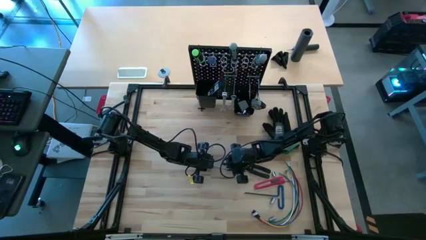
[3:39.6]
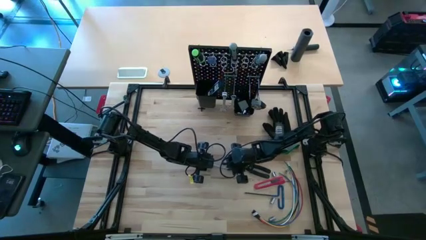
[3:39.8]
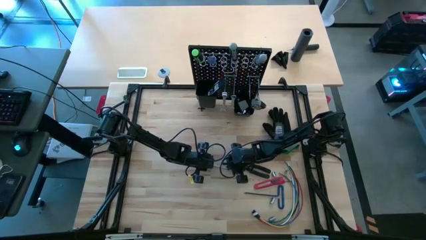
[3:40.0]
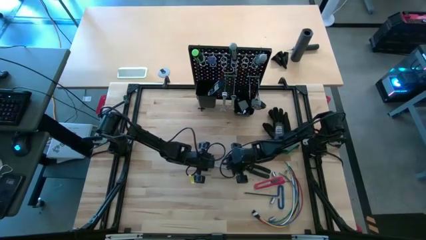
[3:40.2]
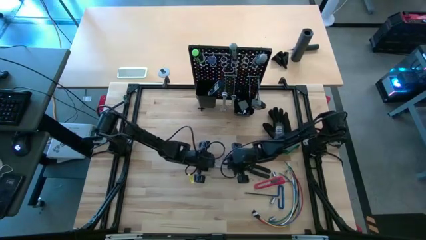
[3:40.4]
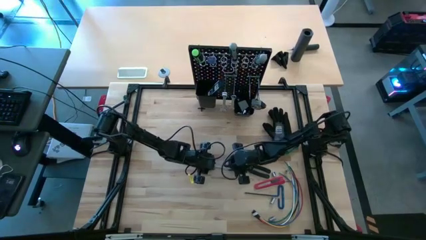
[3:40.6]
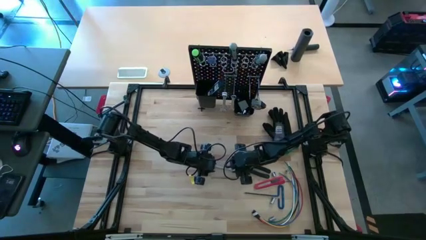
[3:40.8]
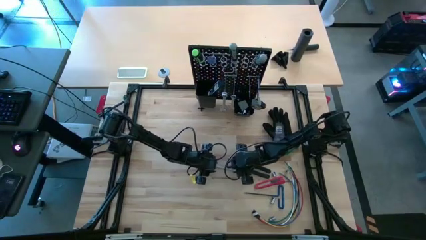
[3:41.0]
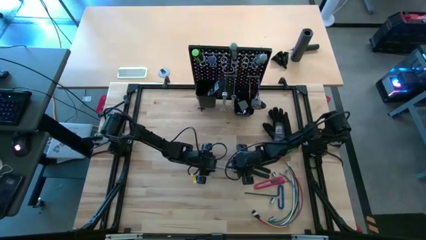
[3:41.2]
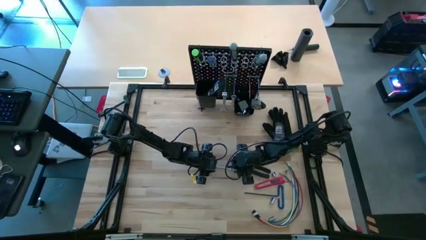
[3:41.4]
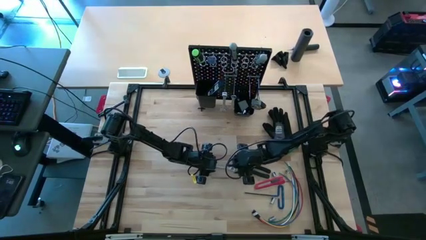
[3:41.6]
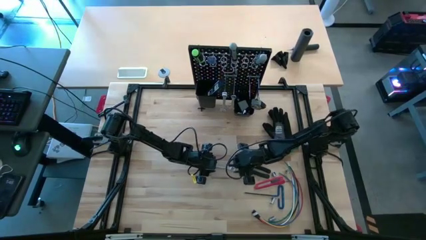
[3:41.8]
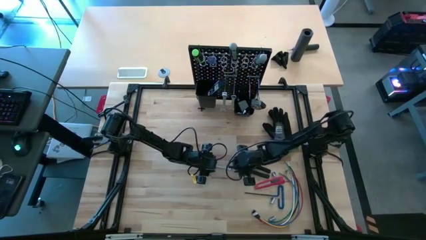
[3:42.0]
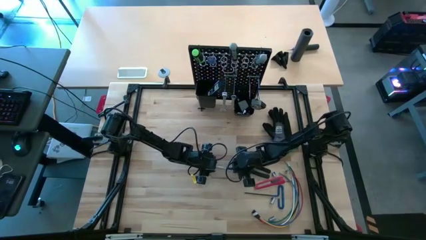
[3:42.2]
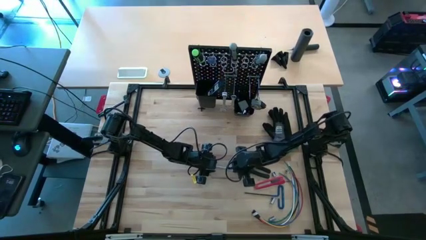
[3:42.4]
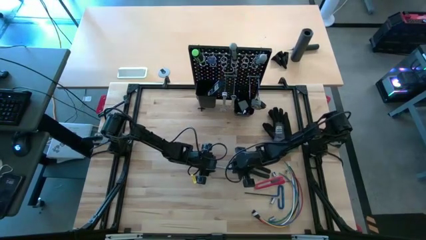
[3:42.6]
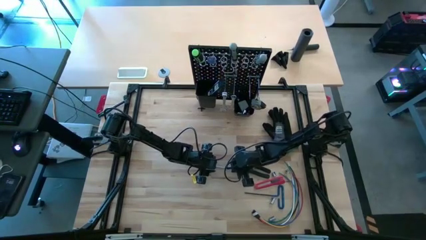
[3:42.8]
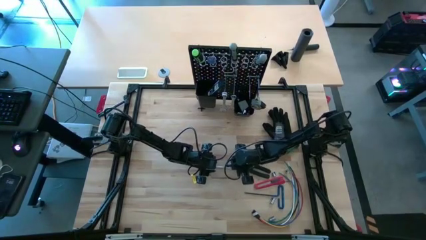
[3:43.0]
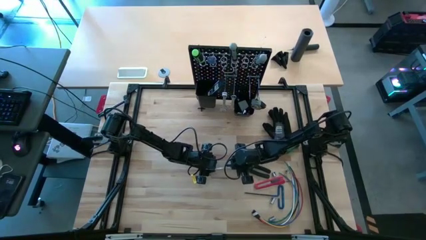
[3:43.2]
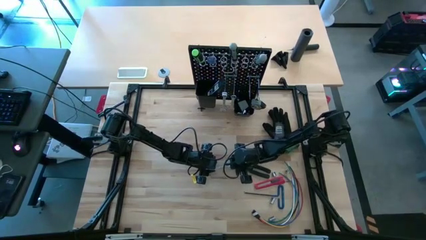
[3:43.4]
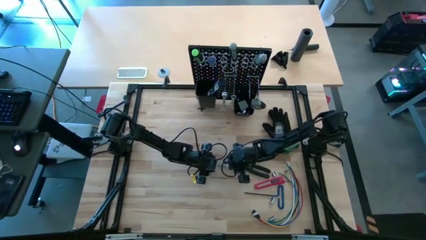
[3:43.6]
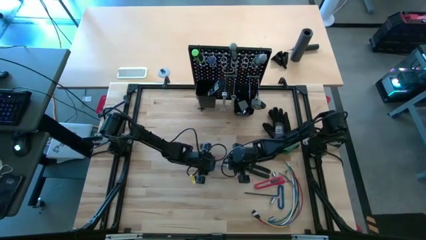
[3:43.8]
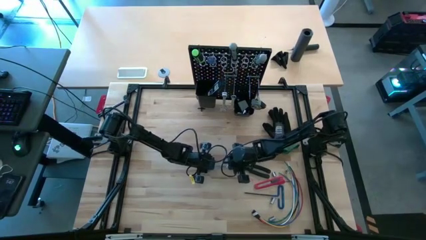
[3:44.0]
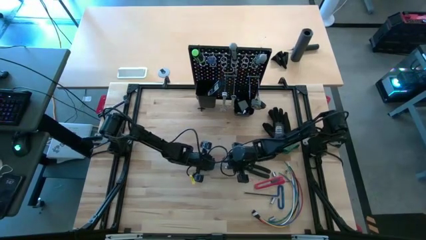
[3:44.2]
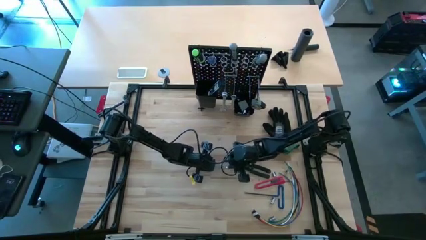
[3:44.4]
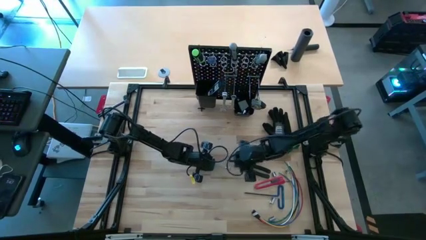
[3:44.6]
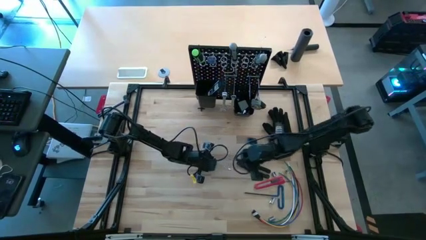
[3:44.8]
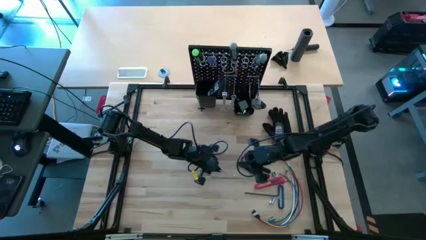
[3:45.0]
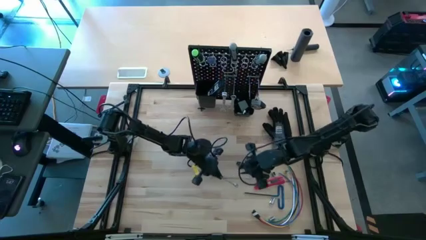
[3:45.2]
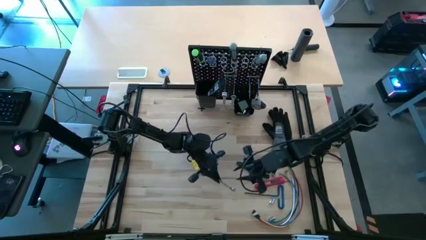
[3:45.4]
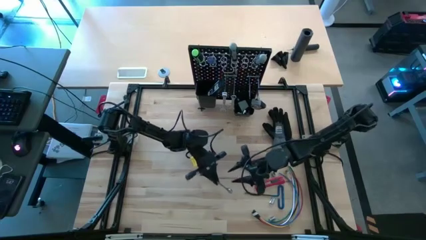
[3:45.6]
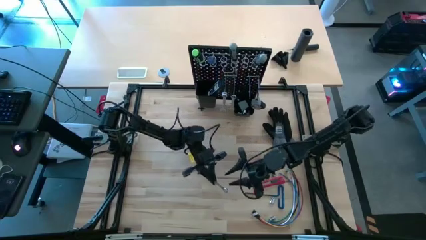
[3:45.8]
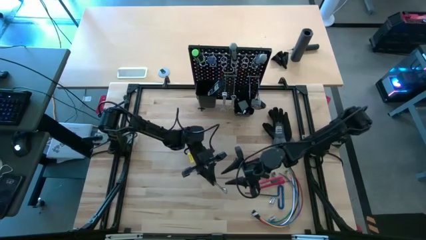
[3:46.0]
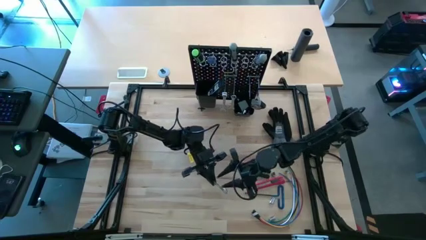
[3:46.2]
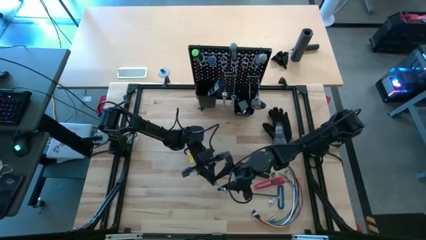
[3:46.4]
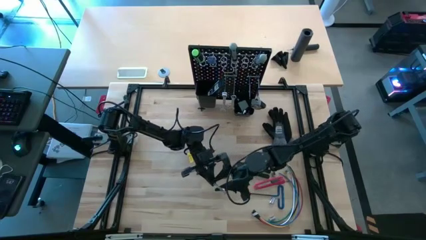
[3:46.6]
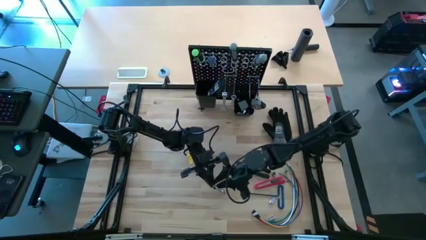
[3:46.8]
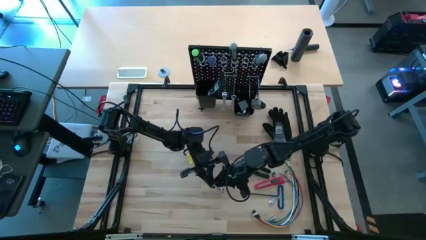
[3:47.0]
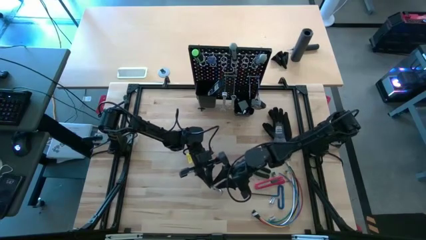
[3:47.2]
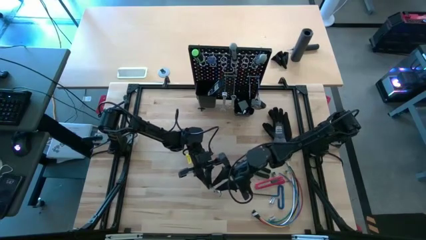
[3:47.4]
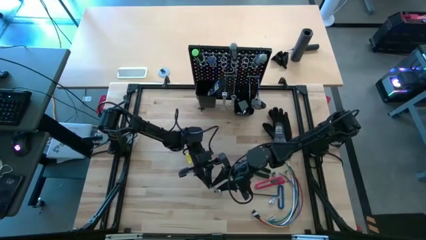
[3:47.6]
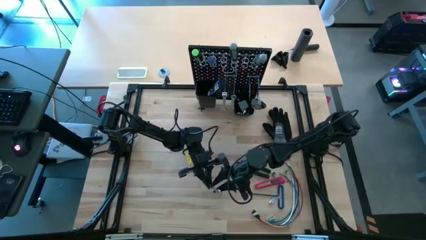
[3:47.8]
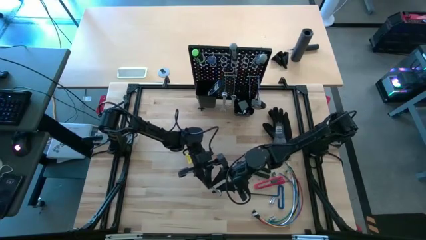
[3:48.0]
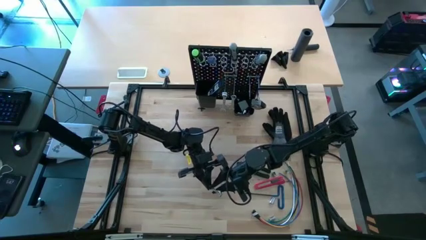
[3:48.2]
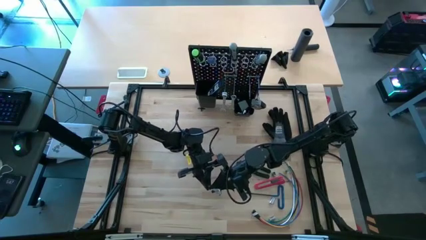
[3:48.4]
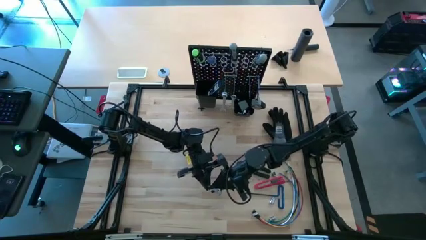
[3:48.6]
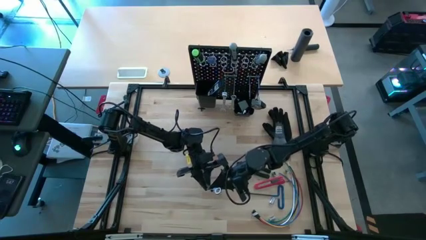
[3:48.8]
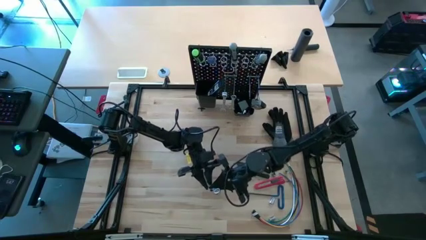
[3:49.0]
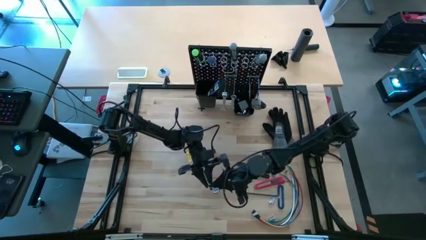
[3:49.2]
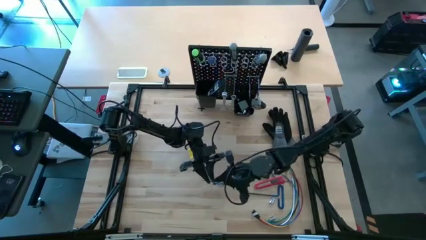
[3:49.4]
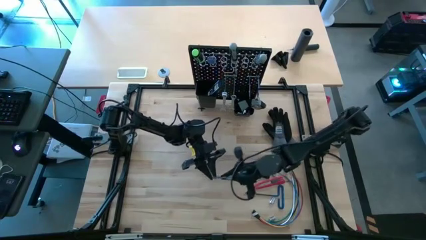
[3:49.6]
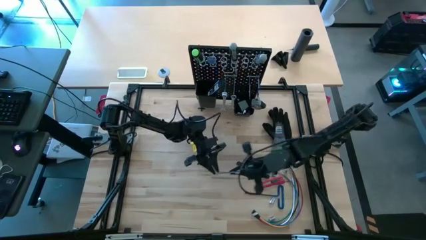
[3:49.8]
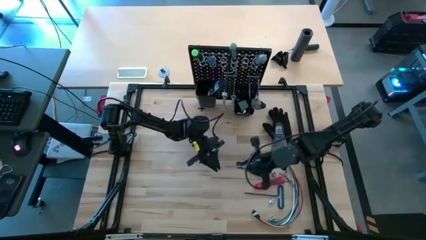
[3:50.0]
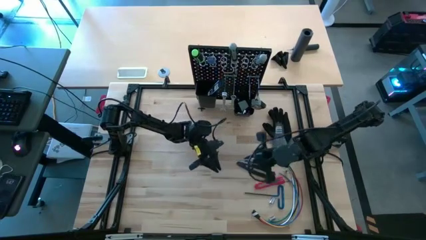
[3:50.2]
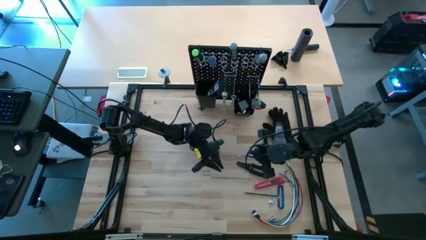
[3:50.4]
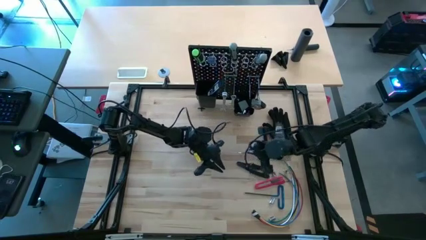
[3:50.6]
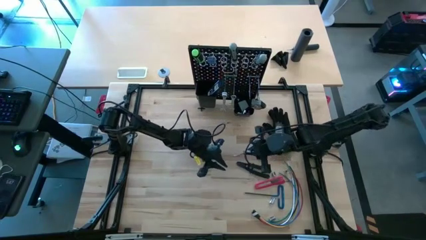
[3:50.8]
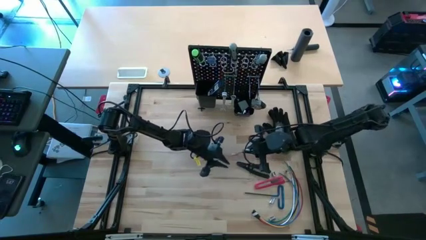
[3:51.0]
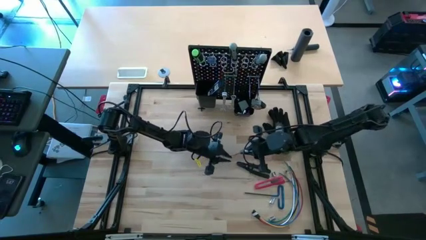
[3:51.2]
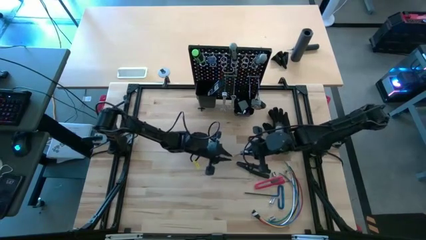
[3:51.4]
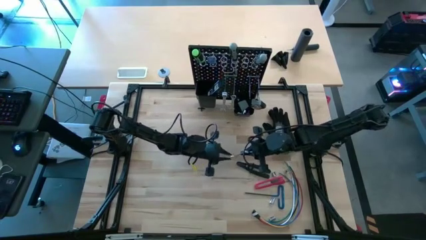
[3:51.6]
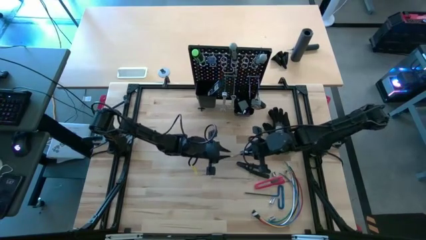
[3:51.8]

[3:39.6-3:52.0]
Task: Hang tools onto peg board
Hang the silver wrench on the peg board
